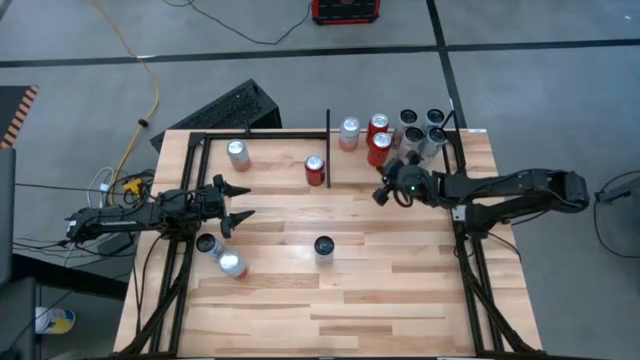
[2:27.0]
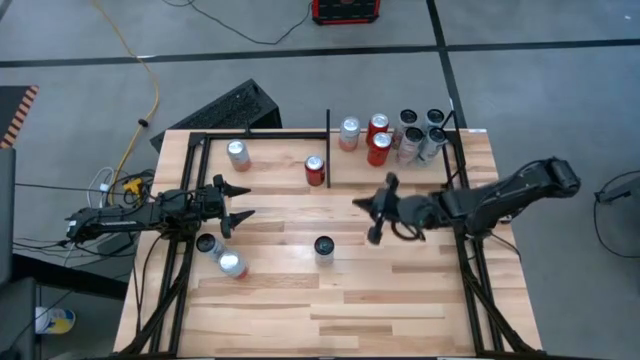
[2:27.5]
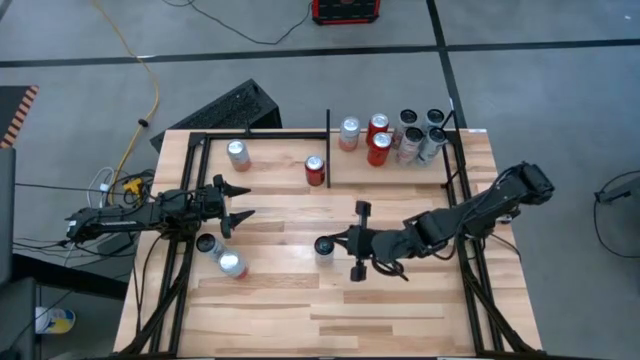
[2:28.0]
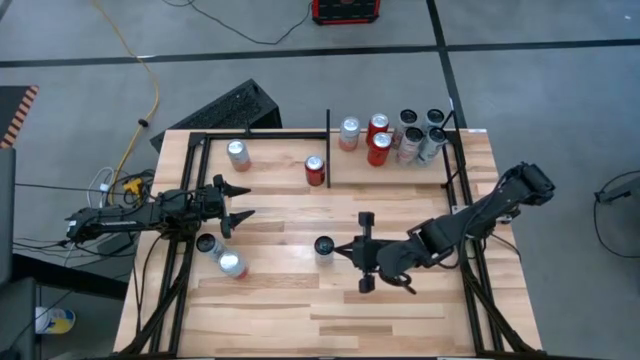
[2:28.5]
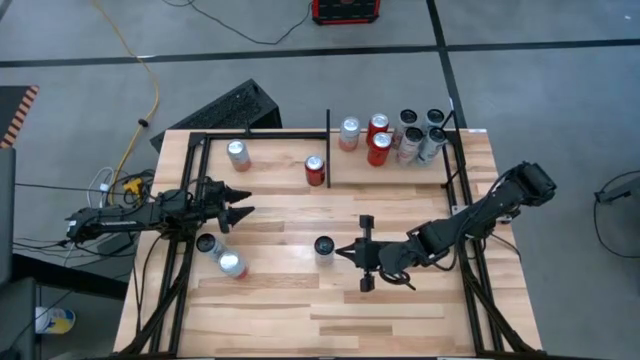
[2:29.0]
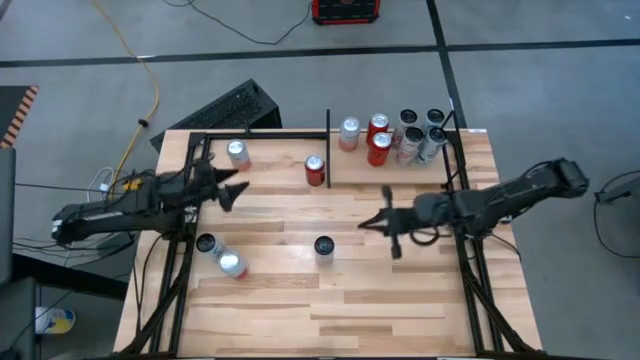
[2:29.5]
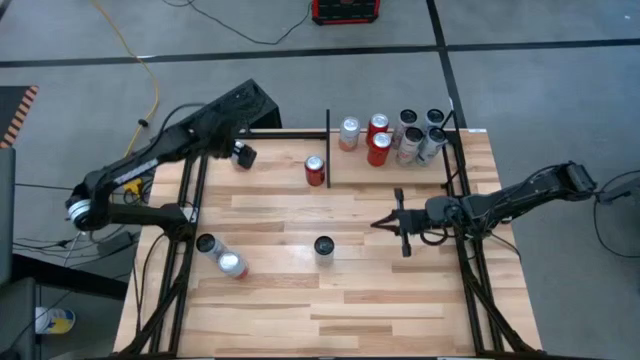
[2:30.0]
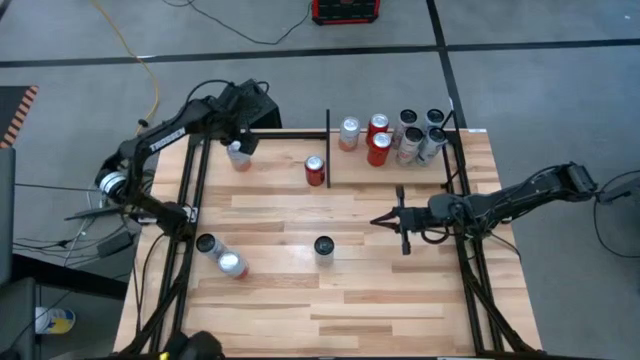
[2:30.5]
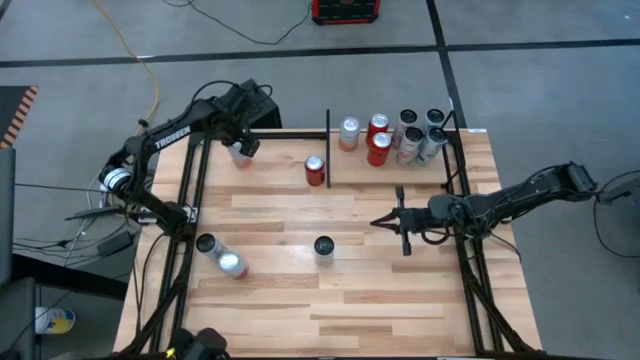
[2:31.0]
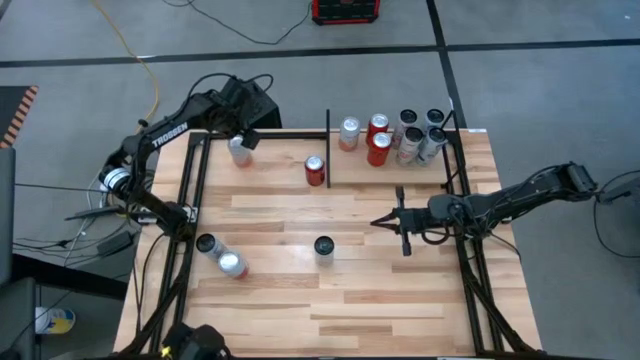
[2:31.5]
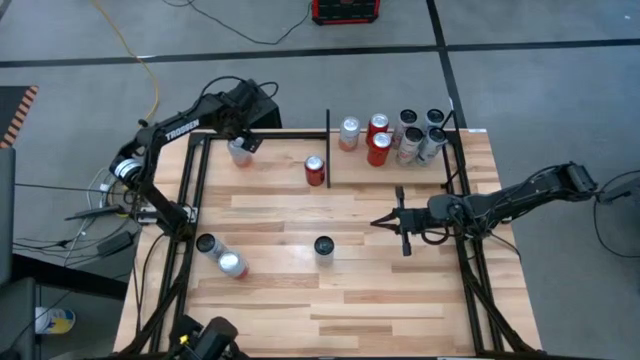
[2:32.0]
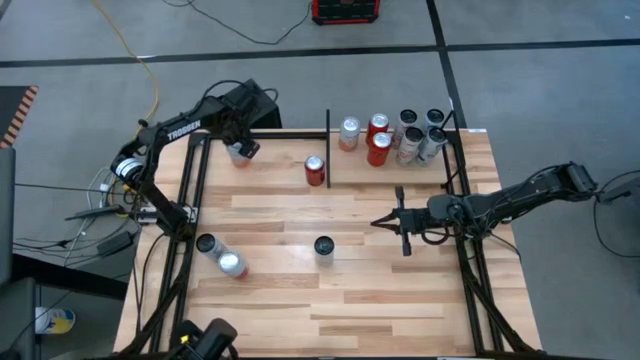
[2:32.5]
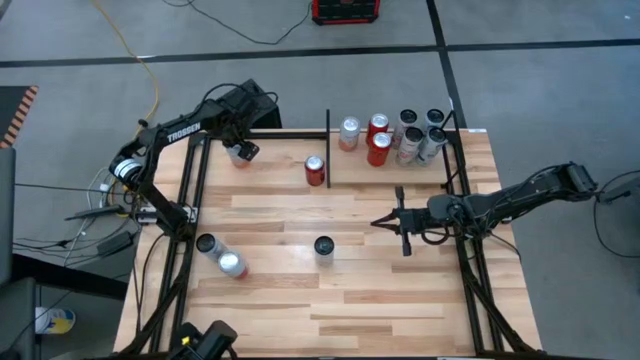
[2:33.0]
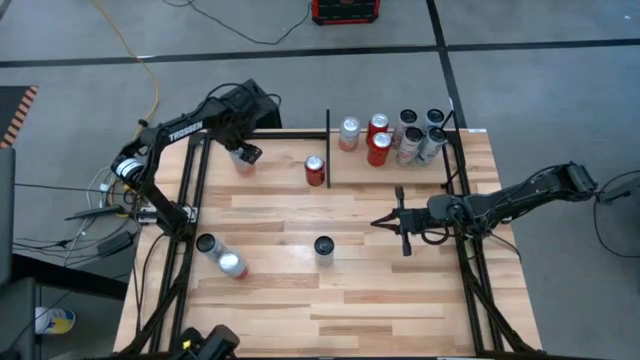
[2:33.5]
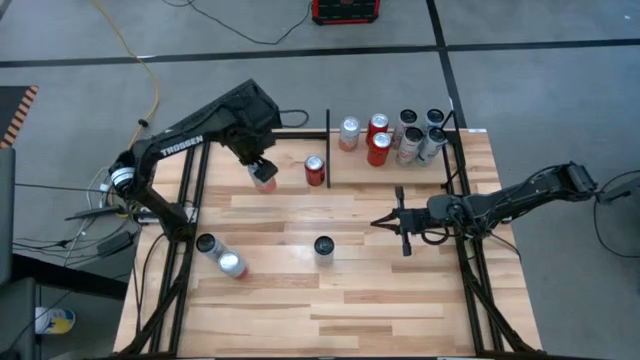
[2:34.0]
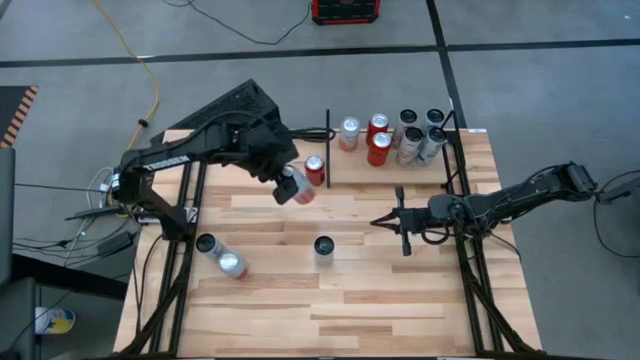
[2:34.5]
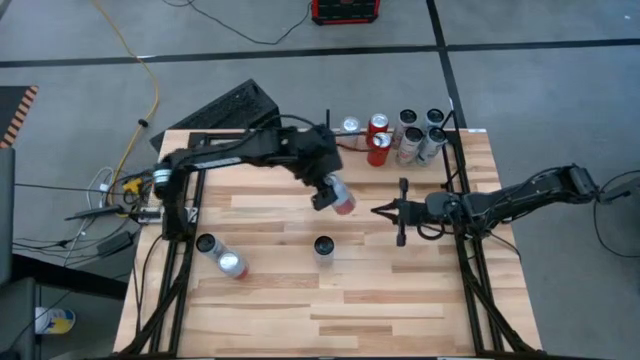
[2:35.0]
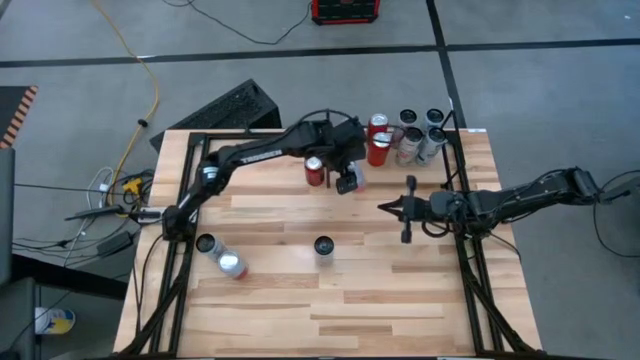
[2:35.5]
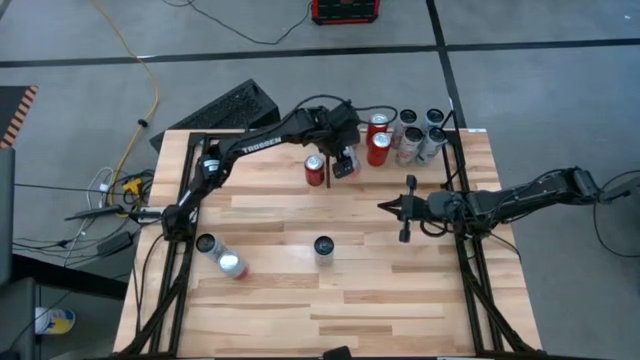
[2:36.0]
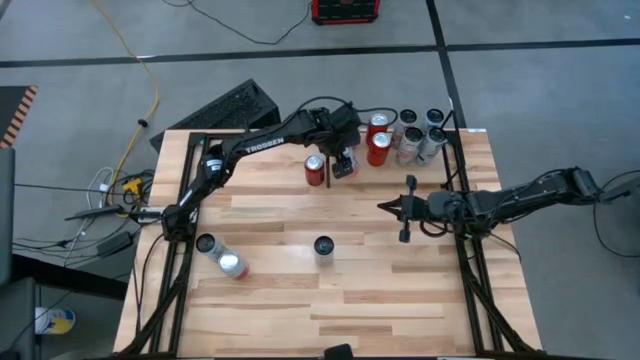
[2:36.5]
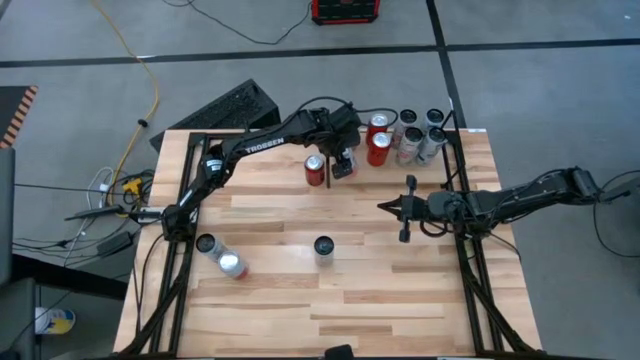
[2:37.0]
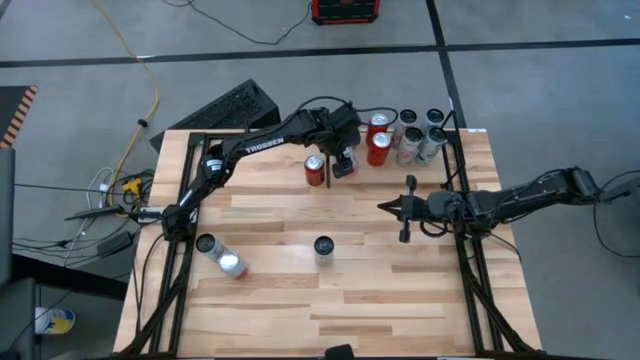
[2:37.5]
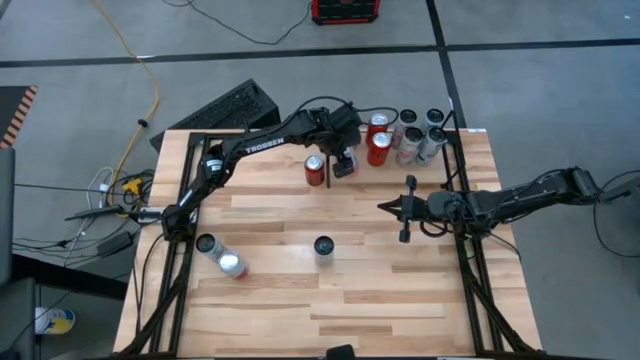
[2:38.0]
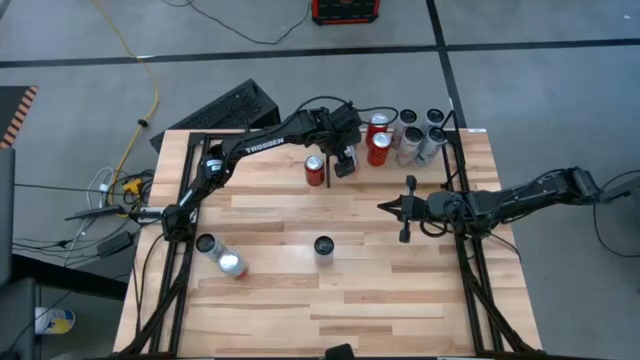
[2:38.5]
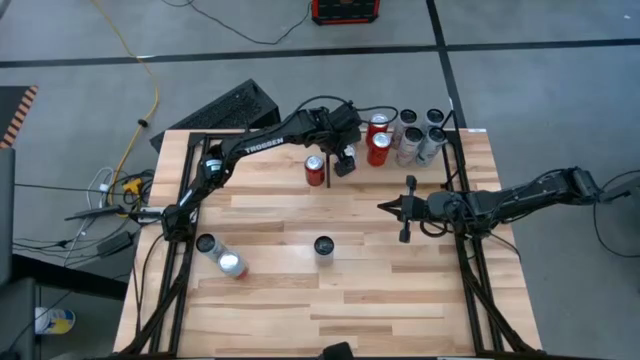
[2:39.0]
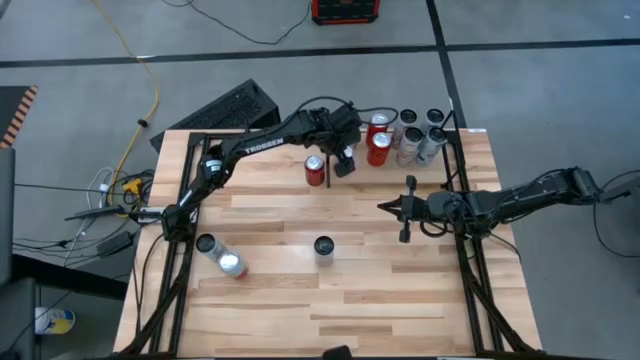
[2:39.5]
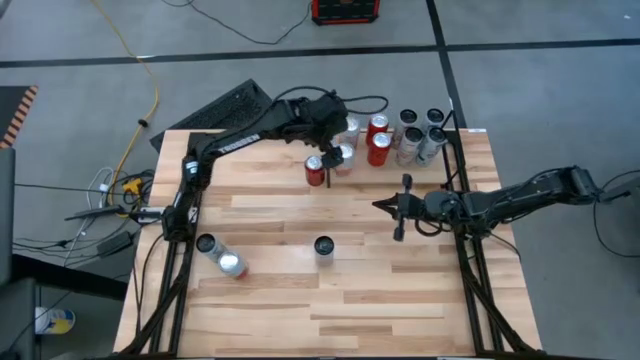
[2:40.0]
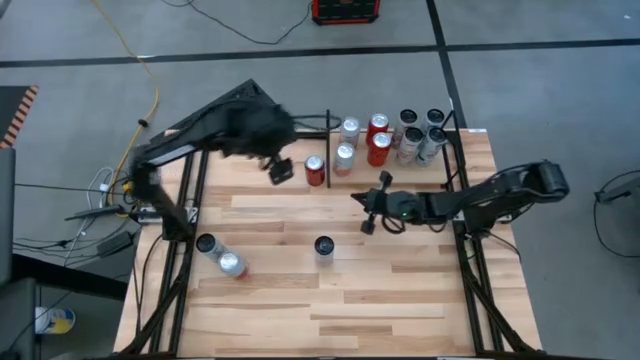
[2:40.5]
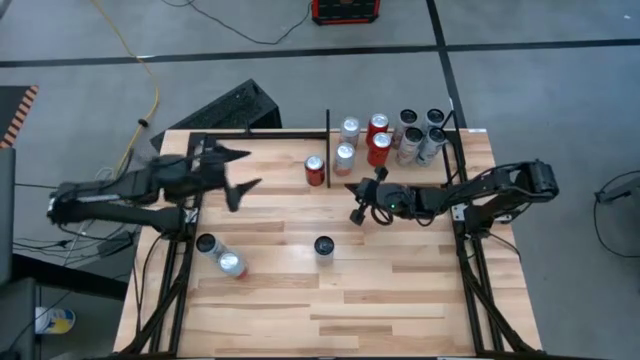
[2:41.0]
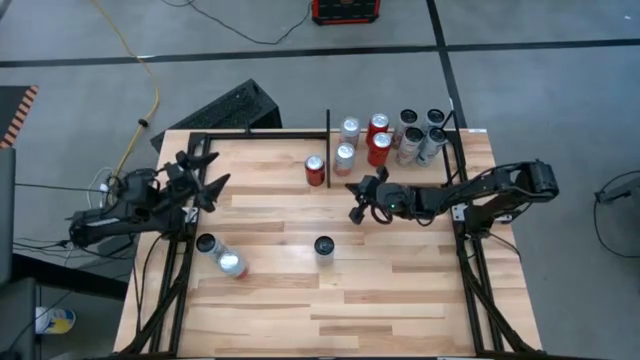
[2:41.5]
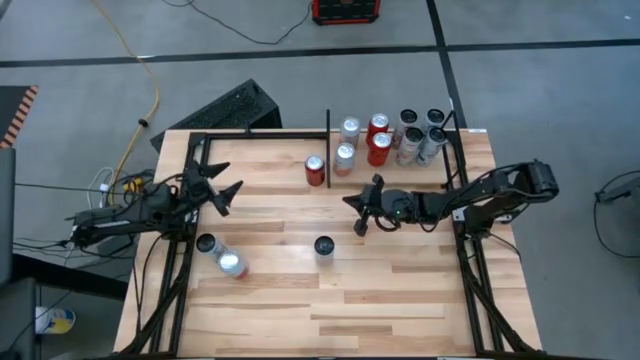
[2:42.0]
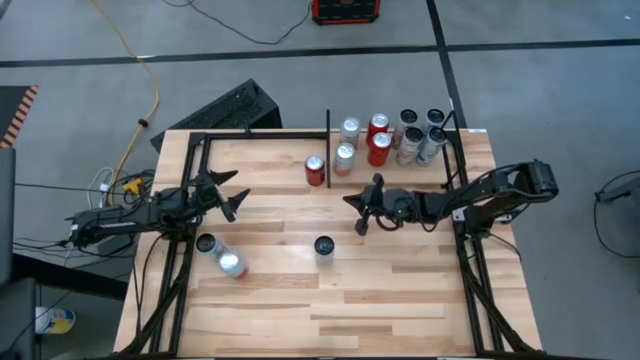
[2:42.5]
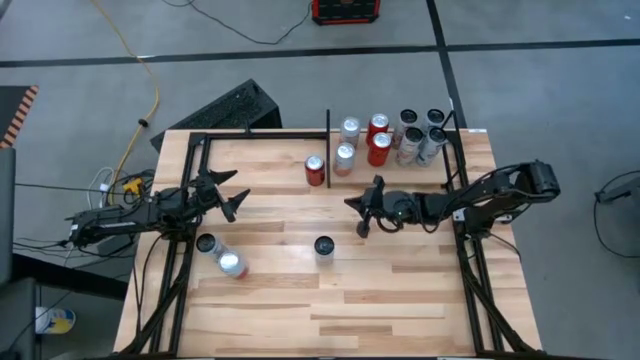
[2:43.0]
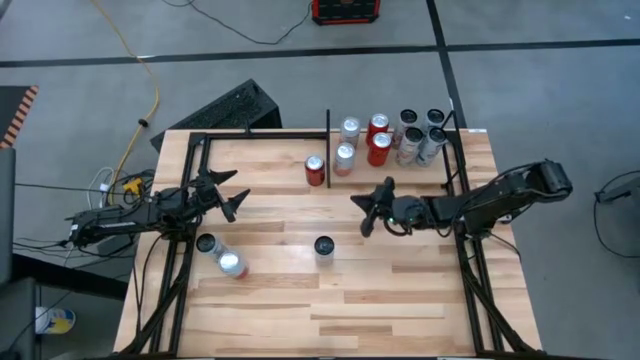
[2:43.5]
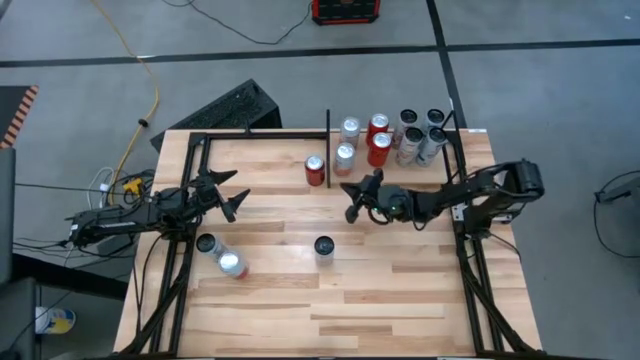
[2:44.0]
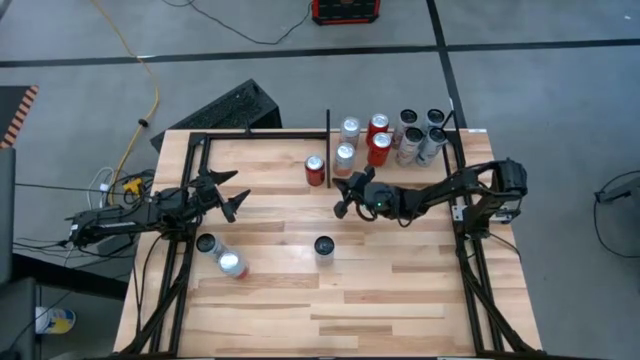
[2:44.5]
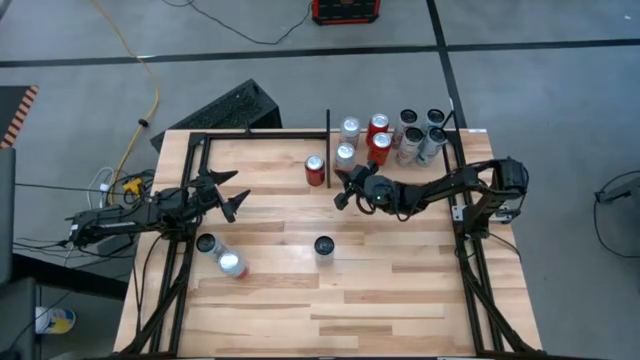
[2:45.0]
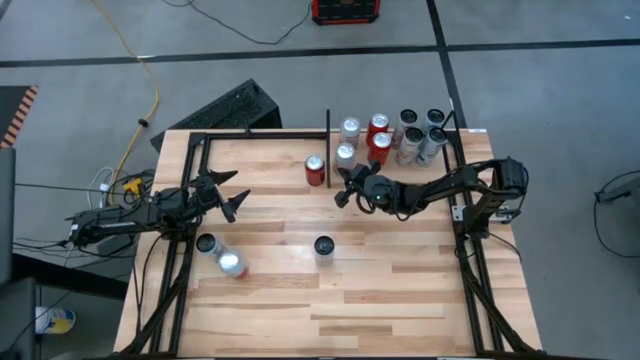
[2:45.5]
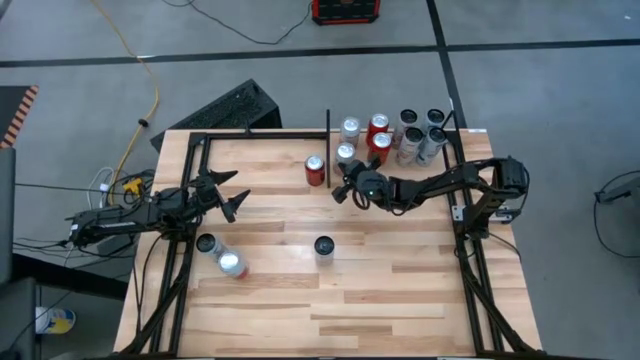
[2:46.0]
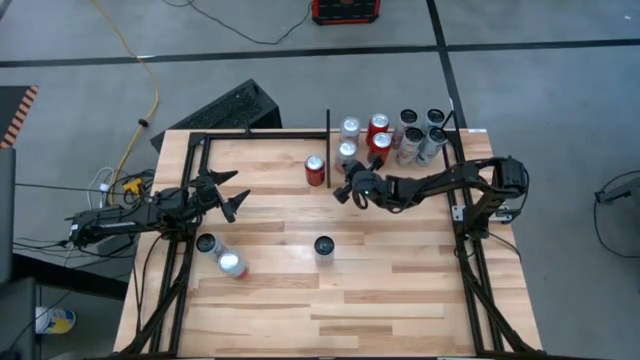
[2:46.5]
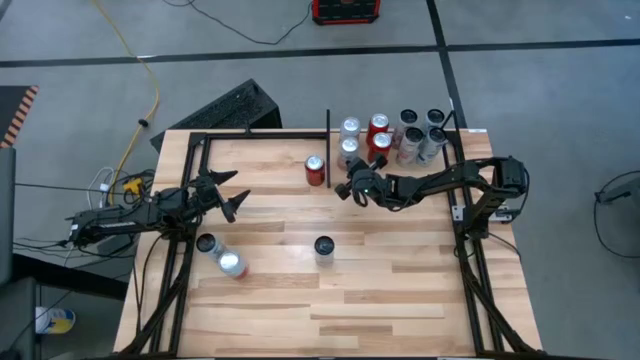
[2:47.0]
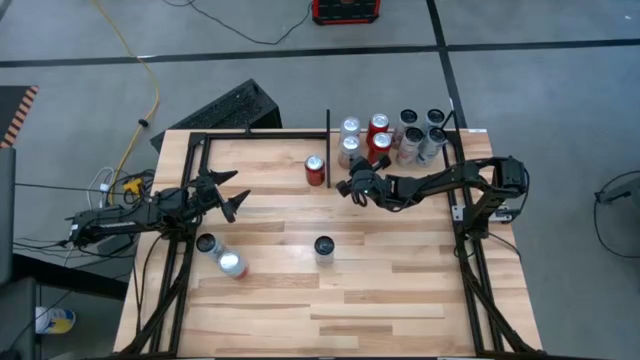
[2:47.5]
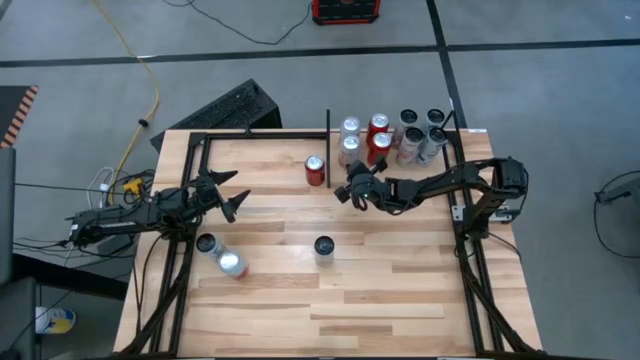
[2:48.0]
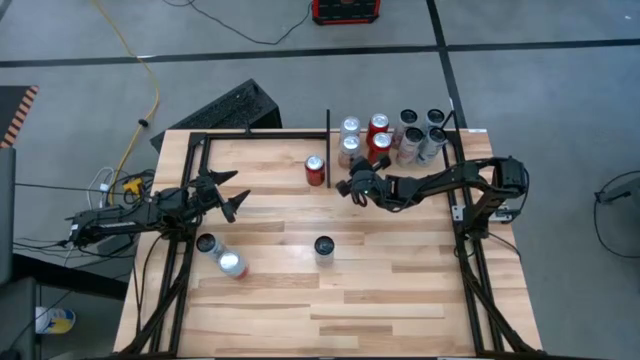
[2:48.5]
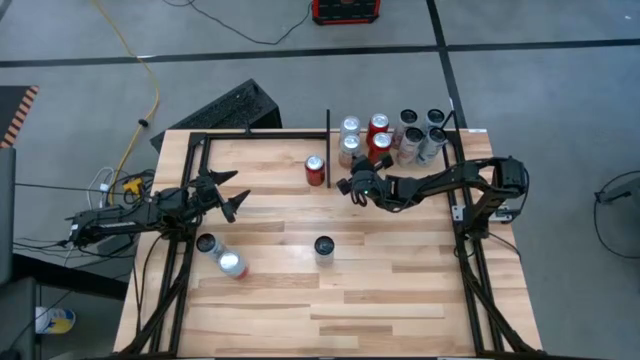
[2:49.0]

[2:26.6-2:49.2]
Task: Place canned beverage on shelf
Put the white soda can on the shelf
